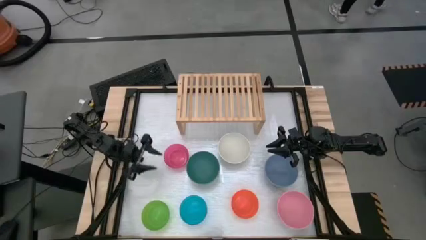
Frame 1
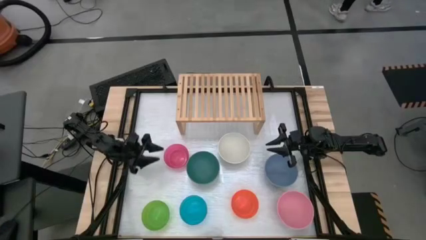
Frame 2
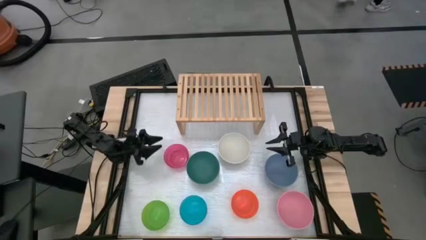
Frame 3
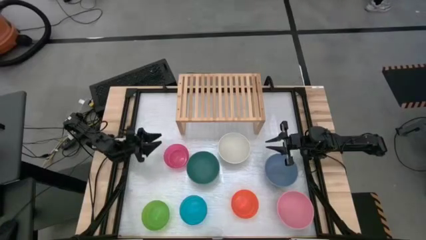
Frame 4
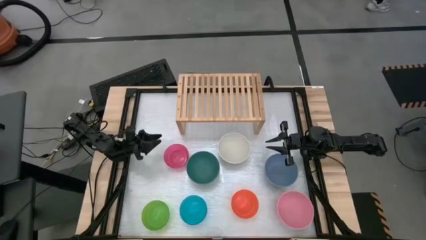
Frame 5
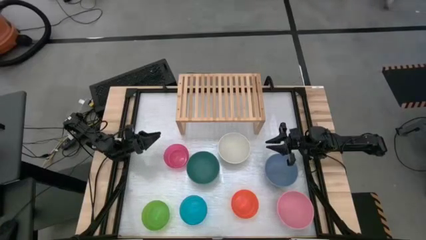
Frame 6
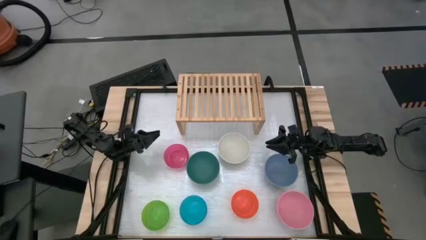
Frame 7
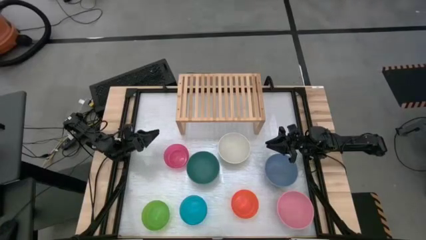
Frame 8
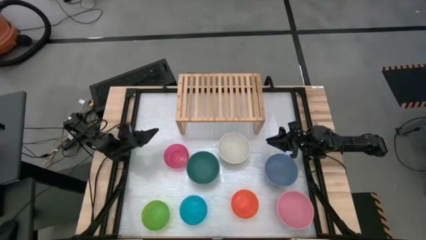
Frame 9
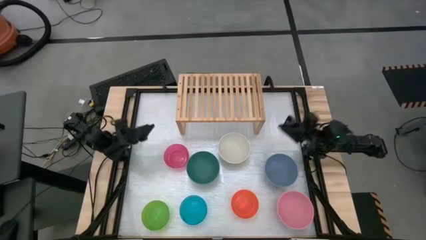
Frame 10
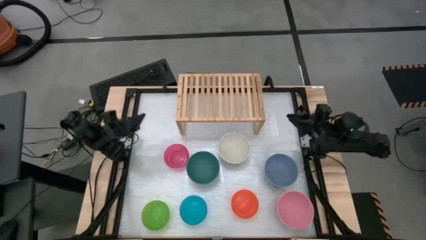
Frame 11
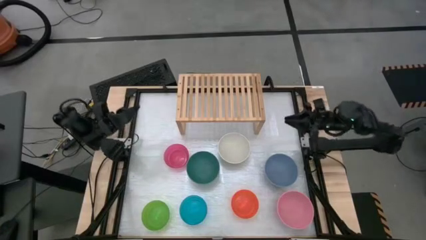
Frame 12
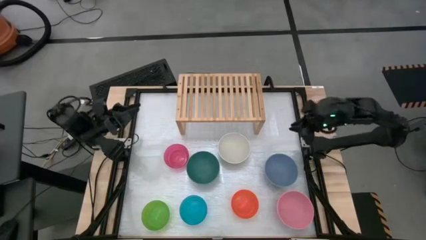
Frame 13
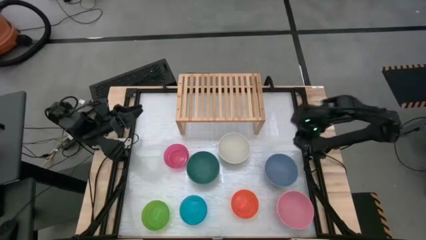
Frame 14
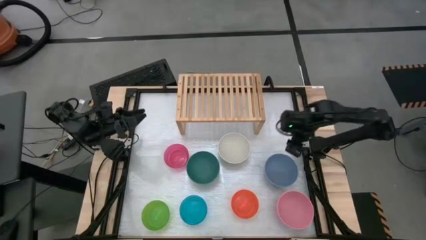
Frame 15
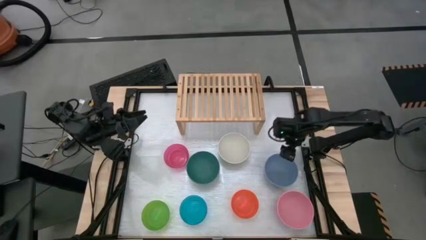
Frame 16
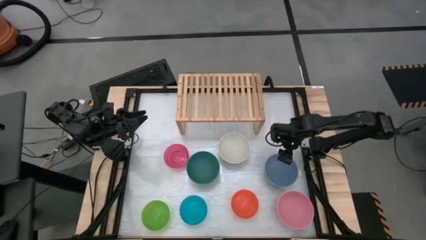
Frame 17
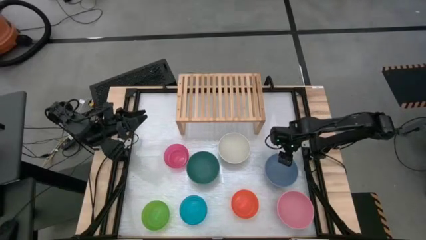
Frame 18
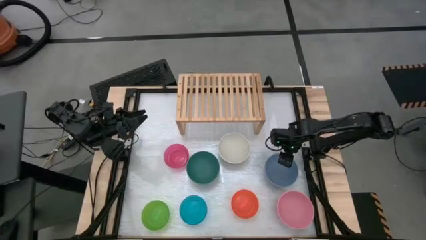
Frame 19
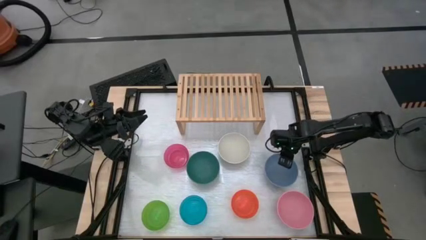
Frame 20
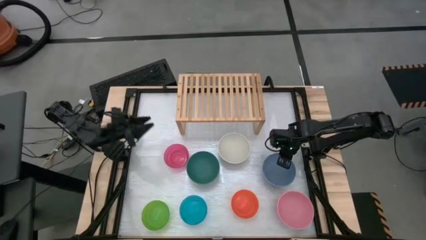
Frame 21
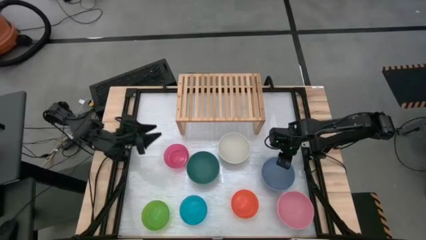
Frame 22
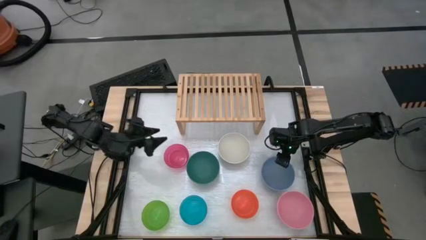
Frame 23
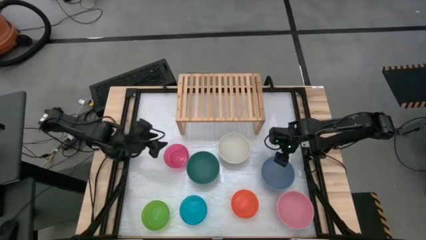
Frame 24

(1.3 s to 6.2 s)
Task: Place and stack bowls onto a shelf
Put the transparent pink bowl on the shelf

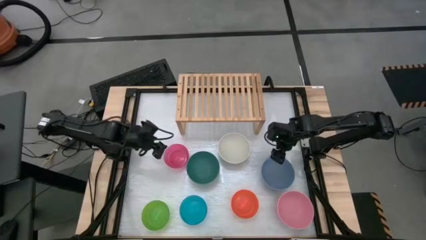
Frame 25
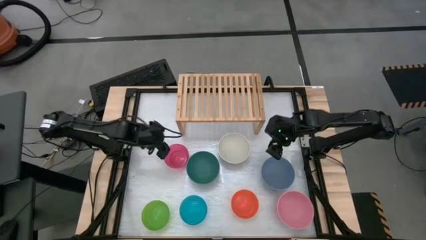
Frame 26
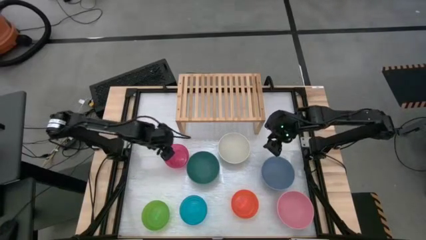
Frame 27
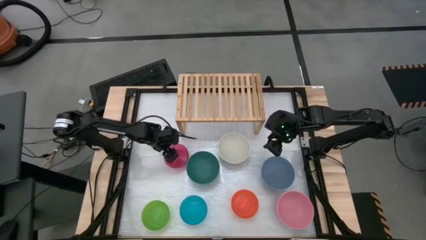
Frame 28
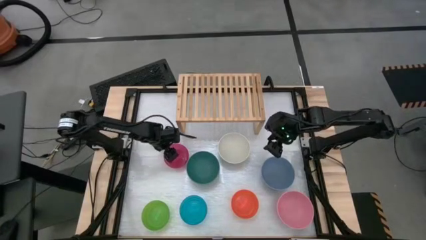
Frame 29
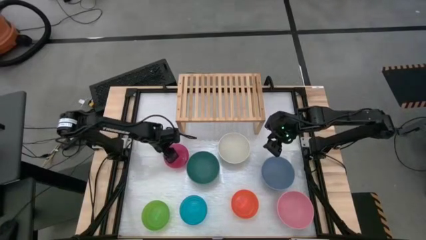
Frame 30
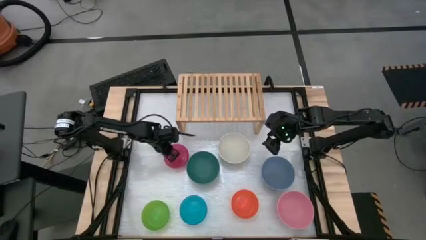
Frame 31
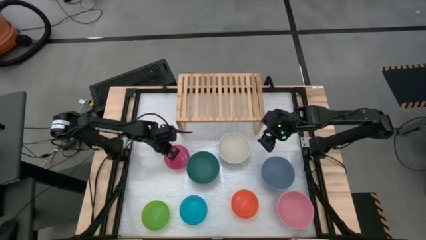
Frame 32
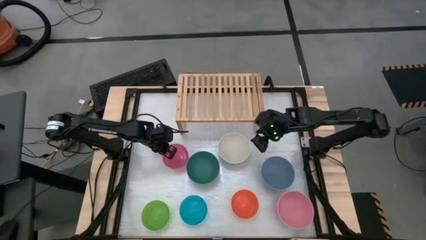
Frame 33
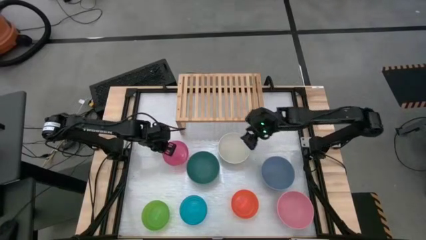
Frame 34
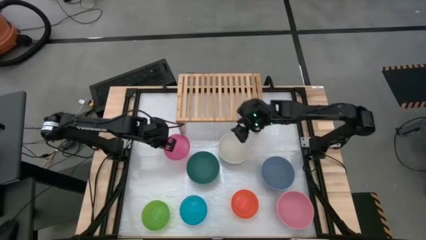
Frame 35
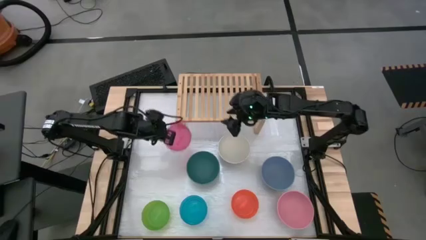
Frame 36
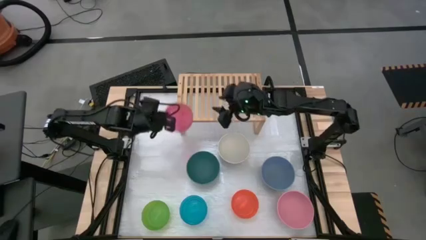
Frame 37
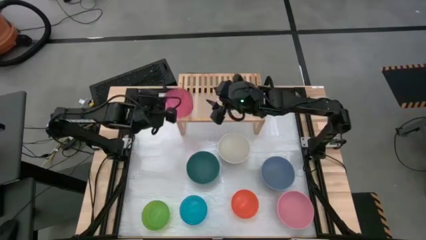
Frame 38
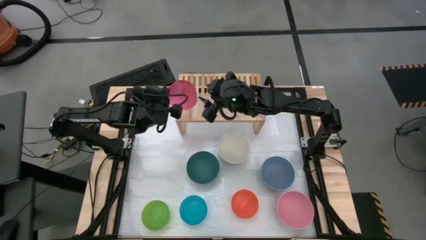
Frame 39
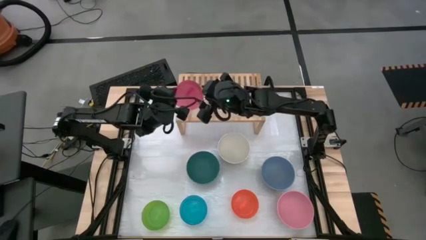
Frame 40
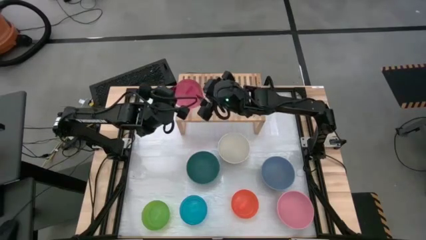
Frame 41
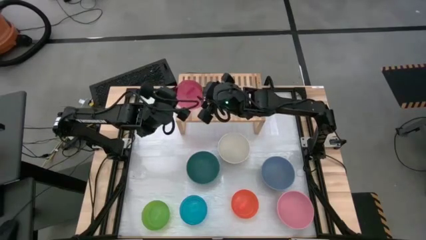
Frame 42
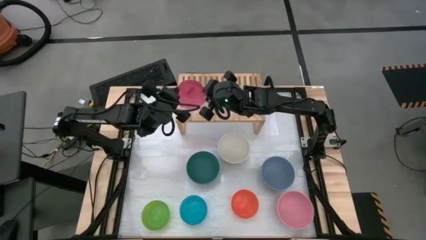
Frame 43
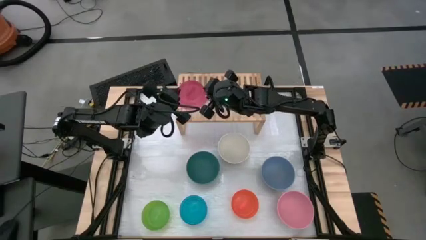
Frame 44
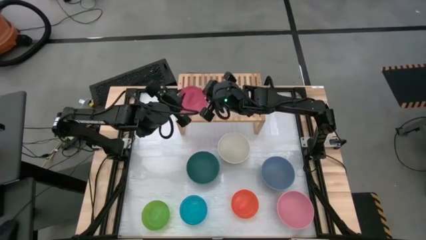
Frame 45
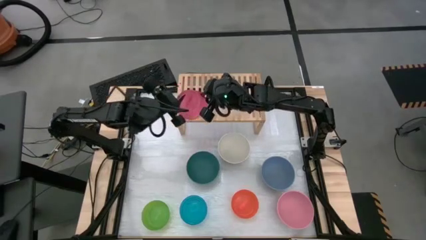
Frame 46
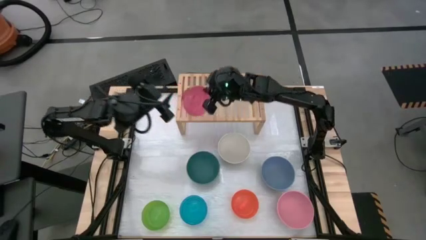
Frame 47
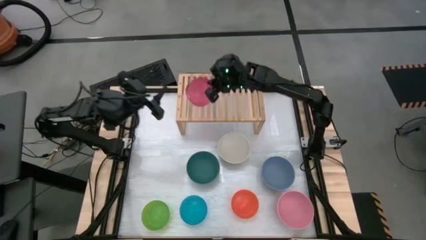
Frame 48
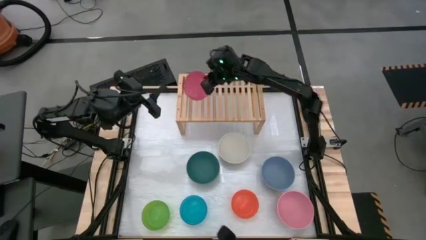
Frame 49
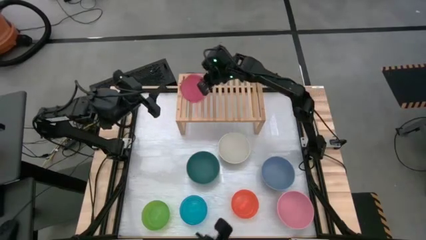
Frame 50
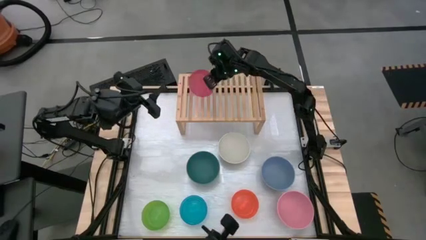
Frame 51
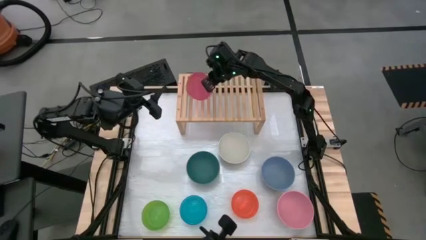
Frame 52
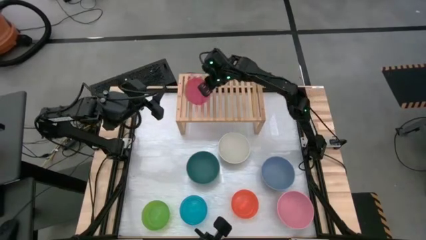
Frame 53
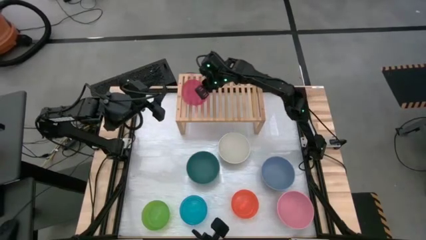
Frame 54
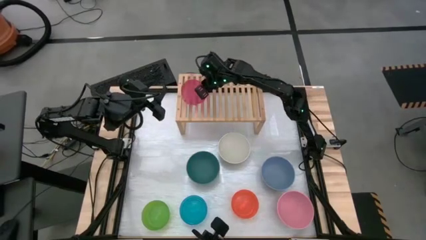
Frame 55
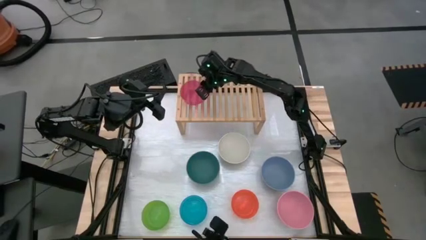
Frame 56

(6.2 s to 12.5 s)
Put the transparent pink bowl on the shelf

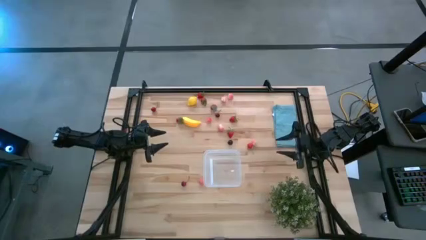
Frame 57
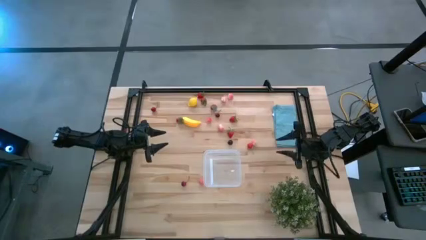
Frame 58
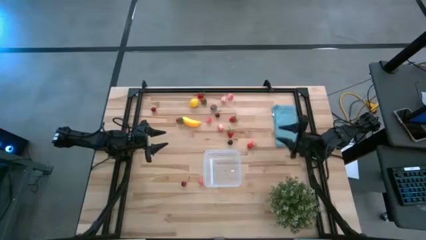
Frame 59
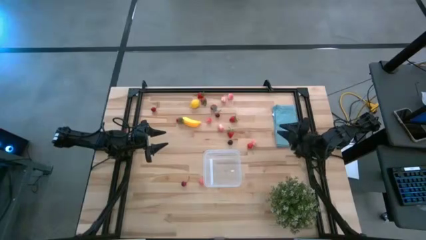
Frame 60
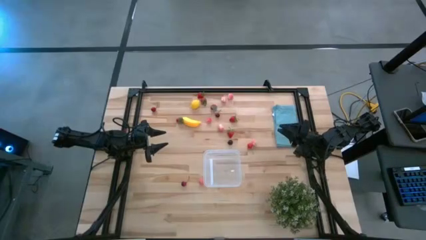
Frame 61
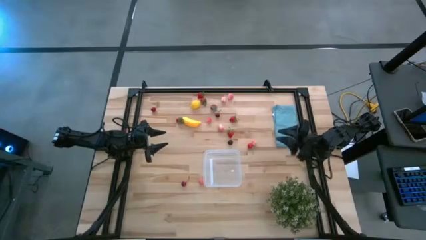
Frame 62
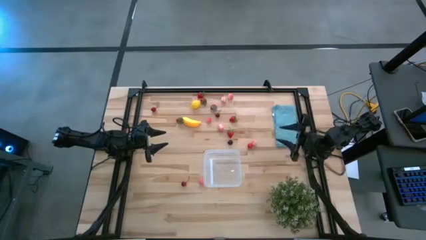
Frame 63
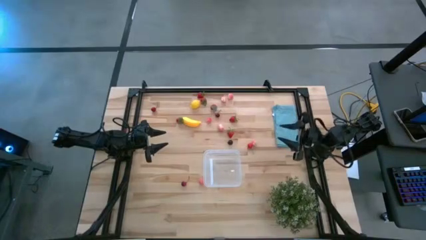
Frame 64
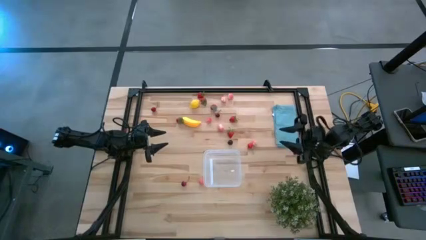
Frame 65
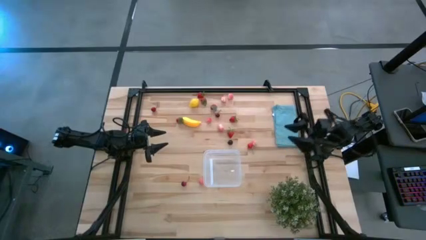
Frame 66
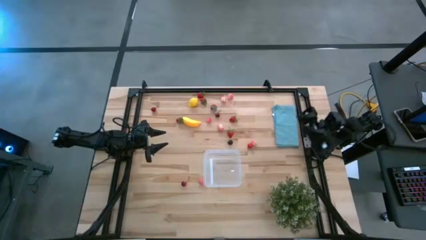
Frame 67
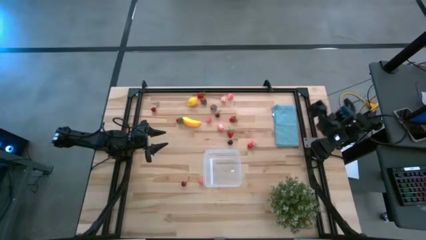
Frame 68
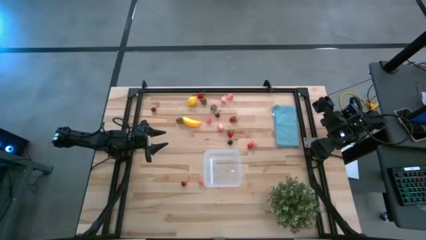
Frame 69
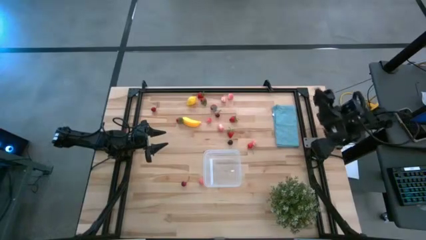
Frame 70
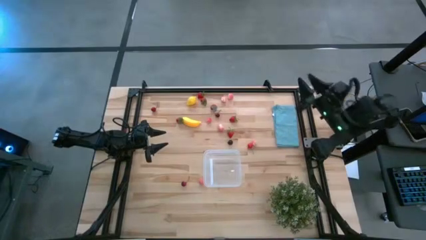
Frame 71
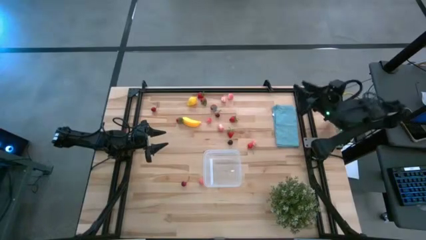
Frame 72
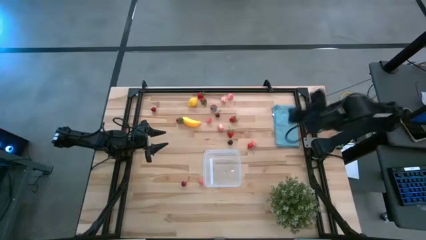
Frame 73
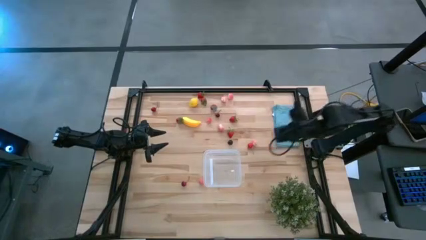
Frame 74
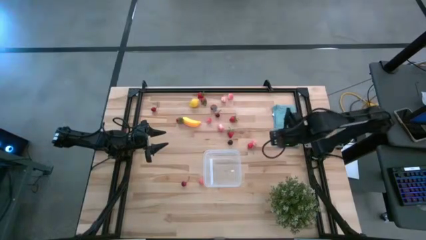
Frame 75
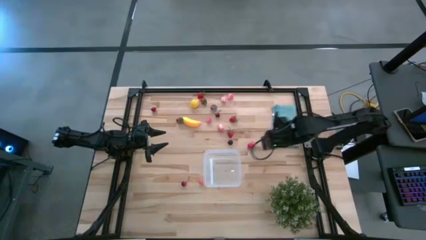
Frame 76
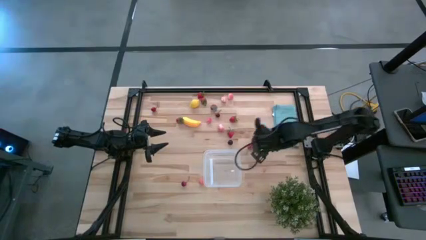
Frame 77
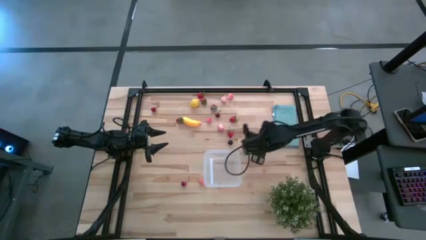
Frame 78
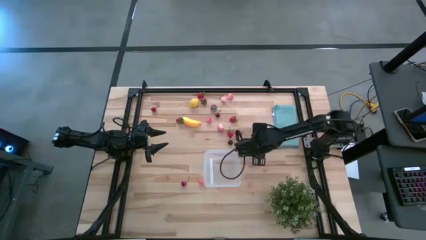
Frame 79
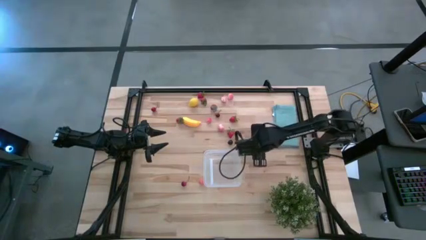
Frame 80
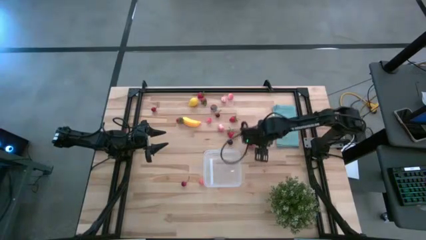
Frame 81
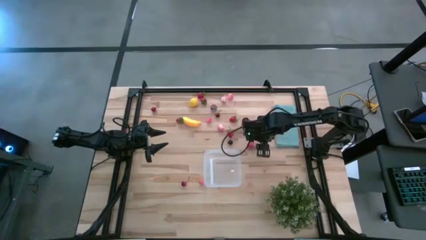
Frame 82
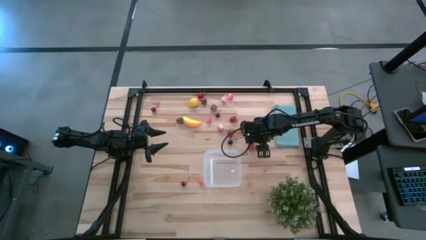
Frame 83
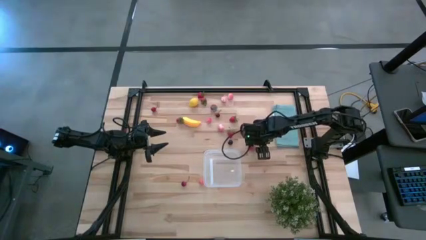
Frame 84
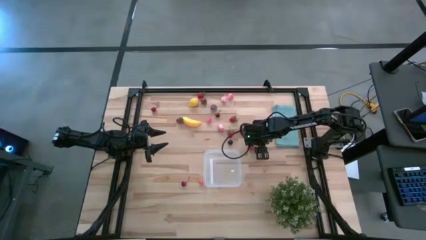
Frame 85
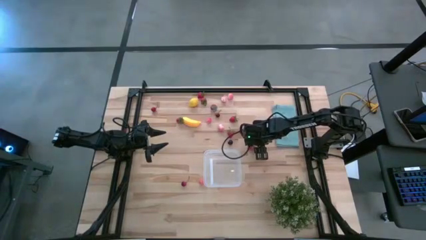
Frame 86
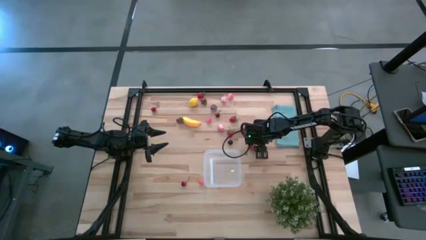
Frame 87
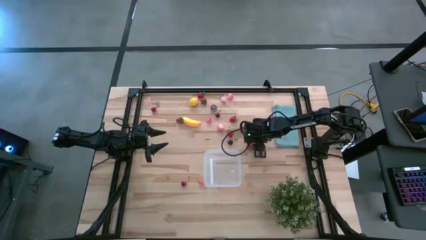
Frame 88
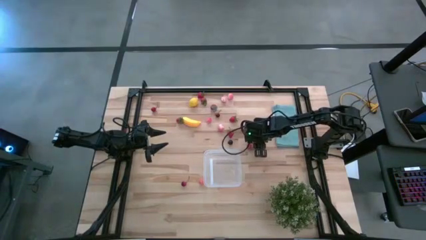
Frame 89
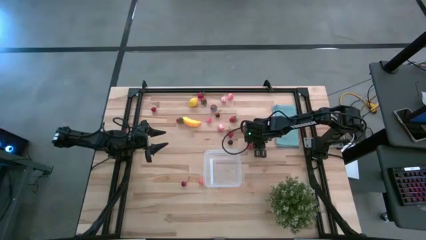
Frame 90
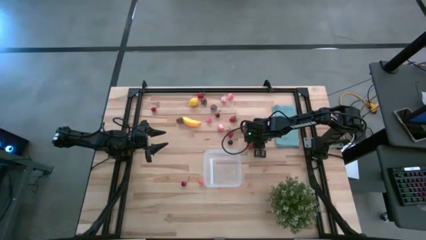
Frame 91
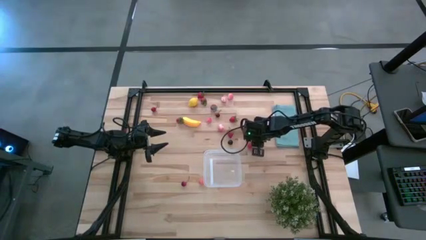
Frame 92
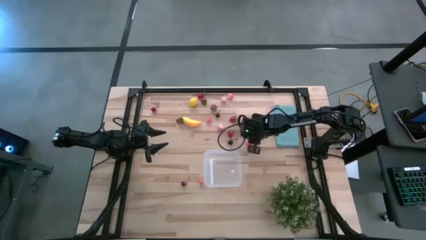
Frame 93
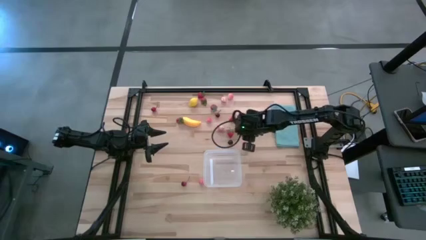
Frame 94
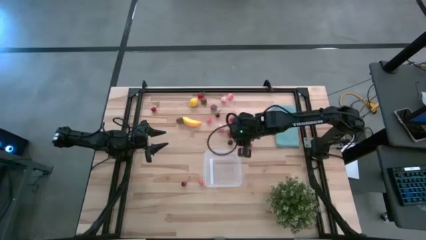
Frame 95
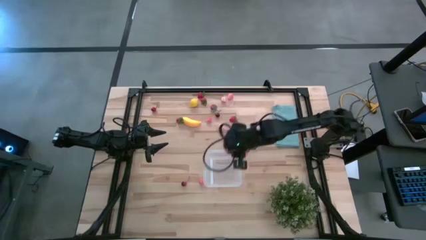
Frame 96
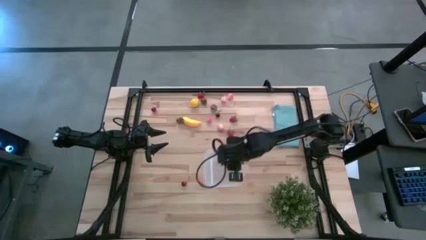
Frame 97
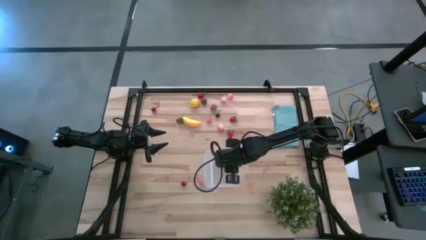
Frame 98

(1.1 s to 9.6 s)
Task: Pick and placing Produce into tupperware
Put the pink peach into the transparent bin
